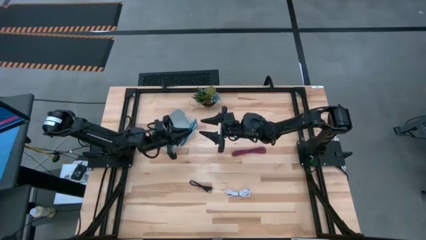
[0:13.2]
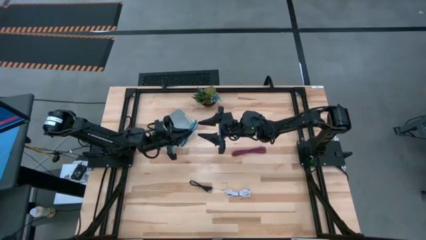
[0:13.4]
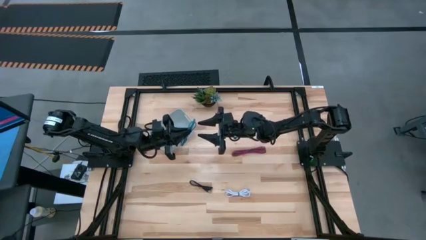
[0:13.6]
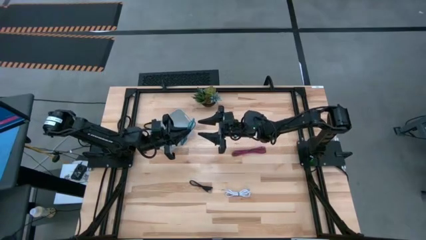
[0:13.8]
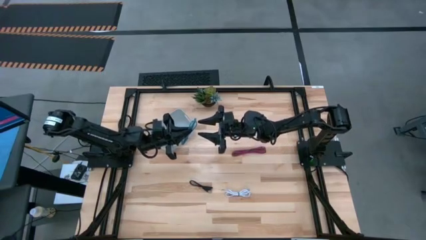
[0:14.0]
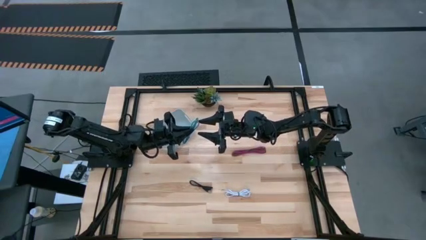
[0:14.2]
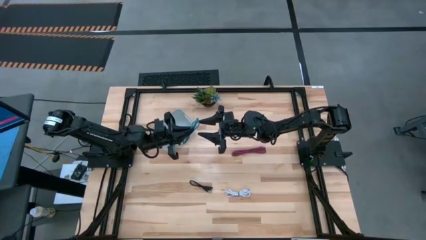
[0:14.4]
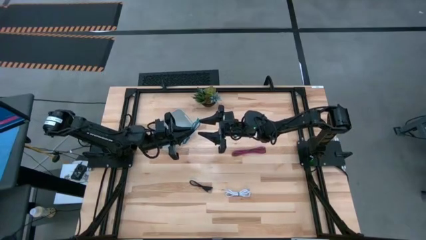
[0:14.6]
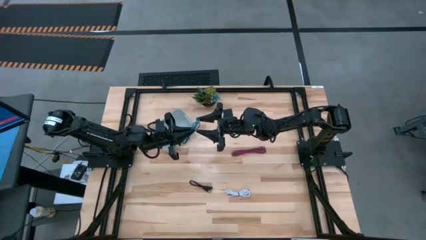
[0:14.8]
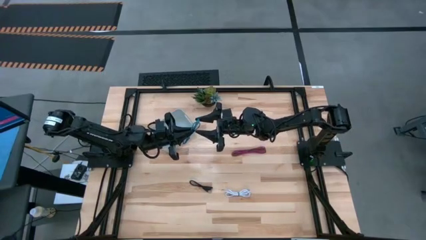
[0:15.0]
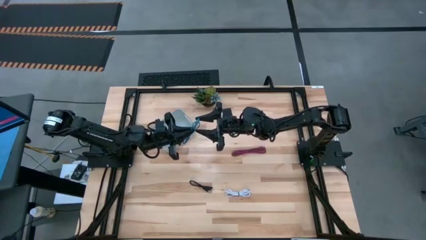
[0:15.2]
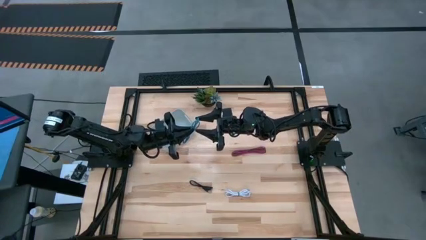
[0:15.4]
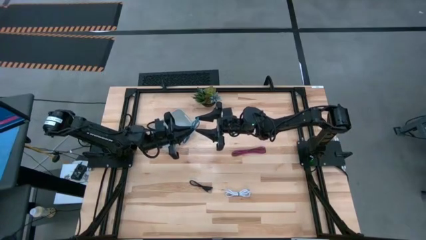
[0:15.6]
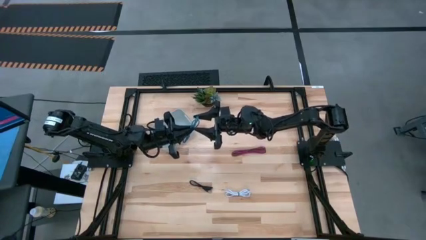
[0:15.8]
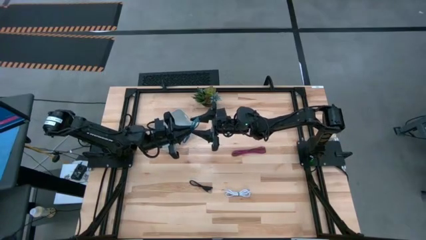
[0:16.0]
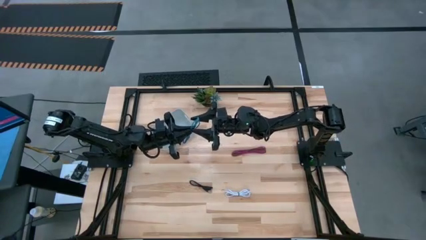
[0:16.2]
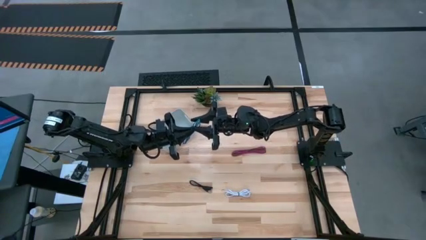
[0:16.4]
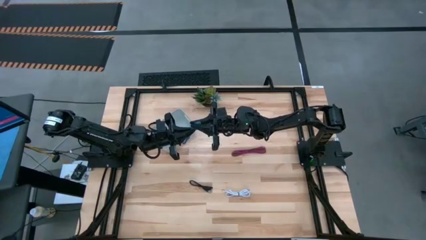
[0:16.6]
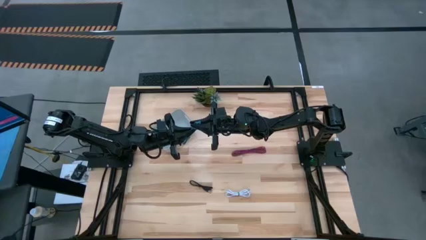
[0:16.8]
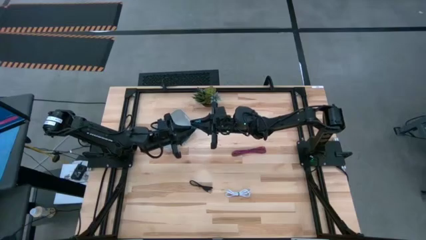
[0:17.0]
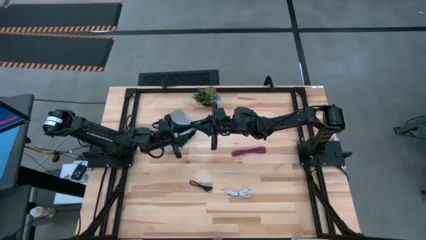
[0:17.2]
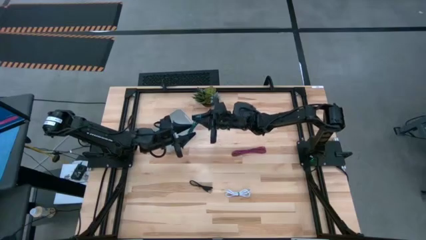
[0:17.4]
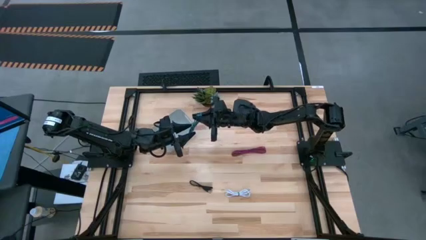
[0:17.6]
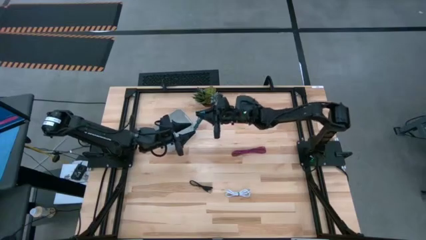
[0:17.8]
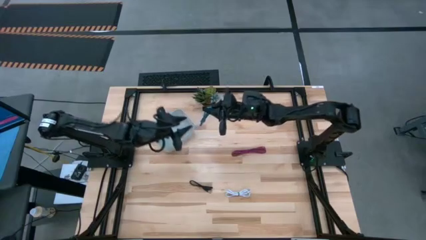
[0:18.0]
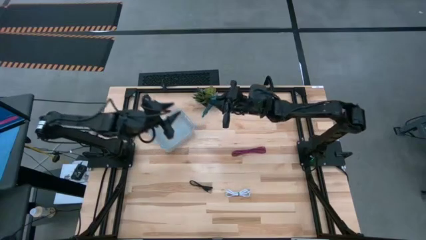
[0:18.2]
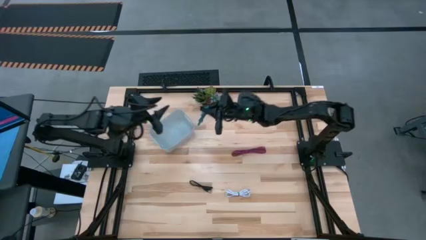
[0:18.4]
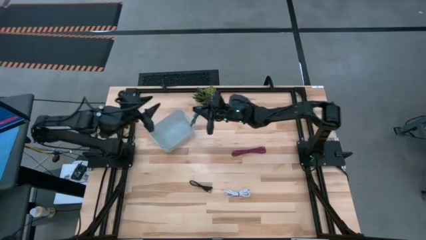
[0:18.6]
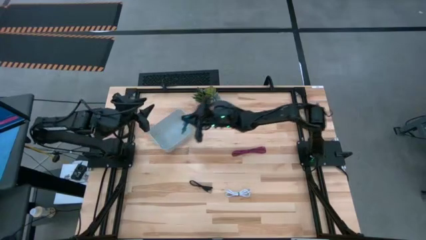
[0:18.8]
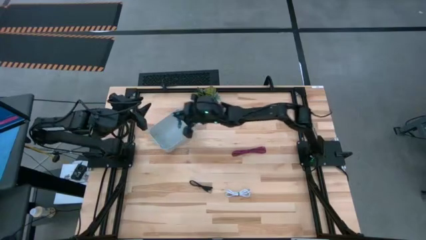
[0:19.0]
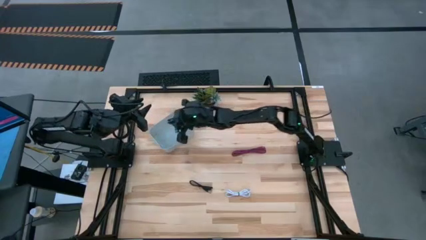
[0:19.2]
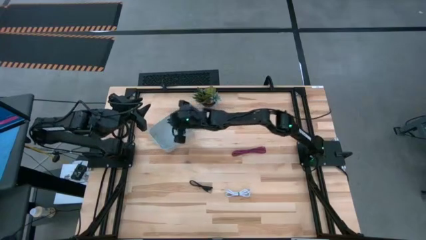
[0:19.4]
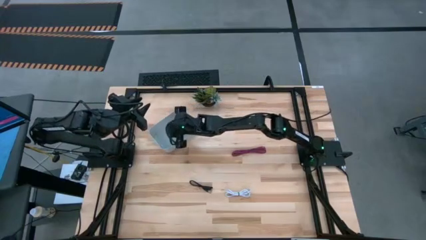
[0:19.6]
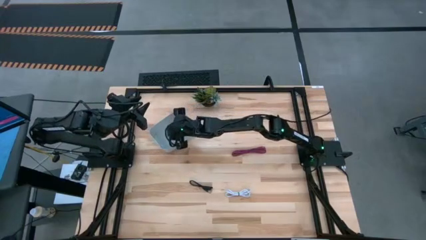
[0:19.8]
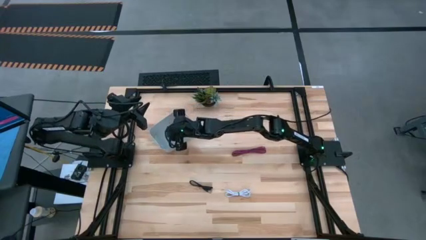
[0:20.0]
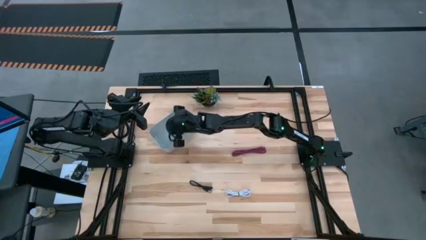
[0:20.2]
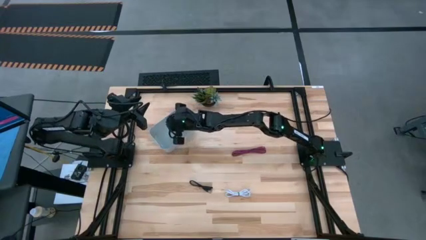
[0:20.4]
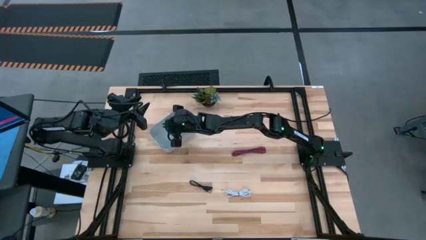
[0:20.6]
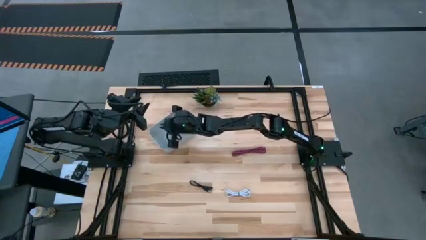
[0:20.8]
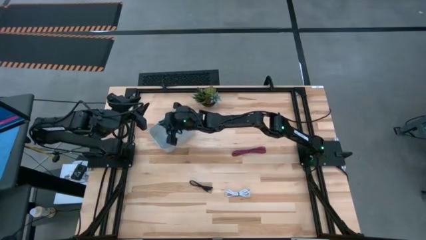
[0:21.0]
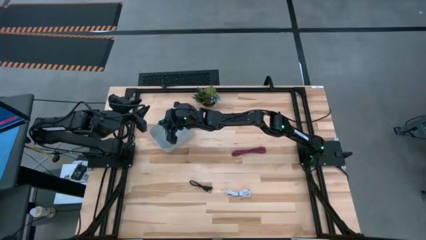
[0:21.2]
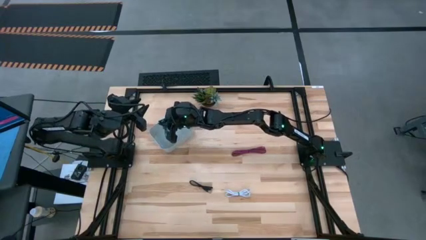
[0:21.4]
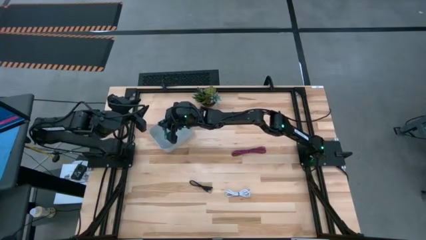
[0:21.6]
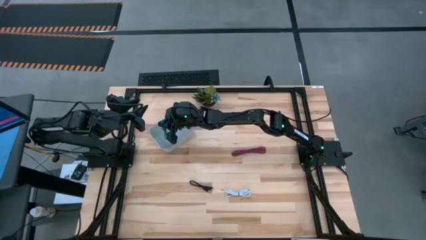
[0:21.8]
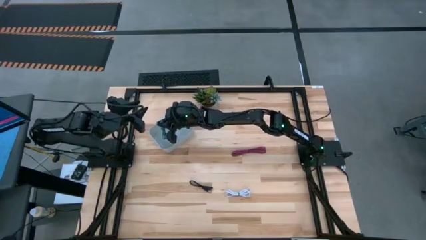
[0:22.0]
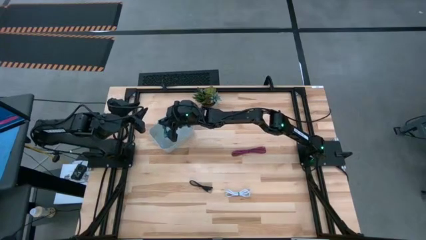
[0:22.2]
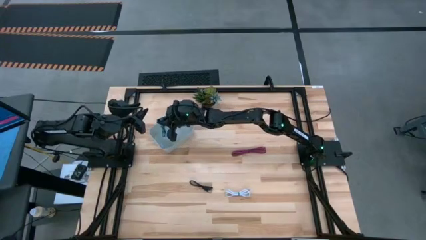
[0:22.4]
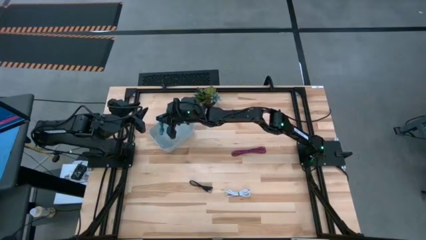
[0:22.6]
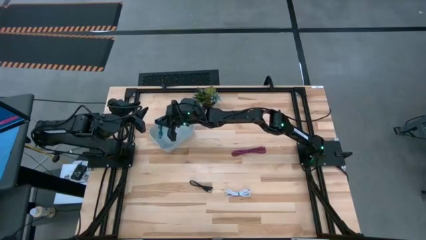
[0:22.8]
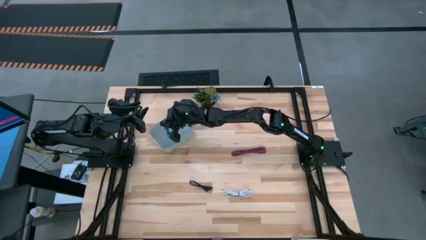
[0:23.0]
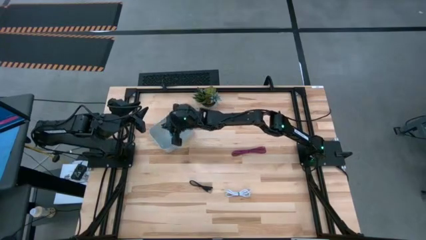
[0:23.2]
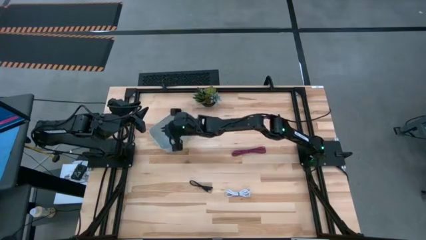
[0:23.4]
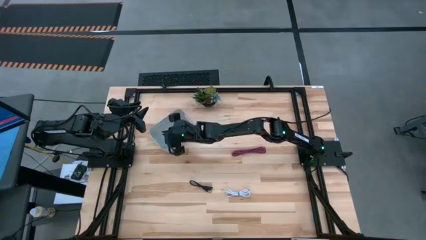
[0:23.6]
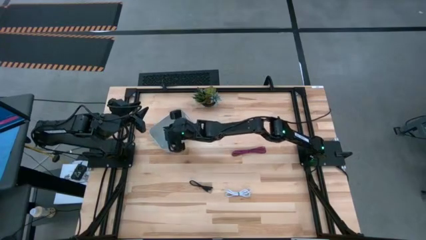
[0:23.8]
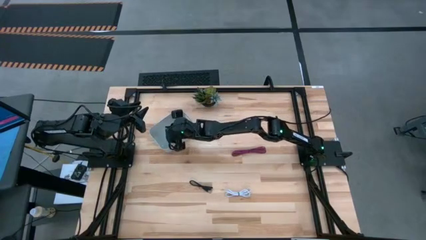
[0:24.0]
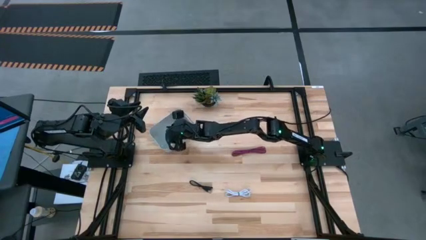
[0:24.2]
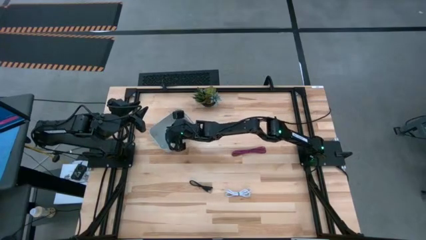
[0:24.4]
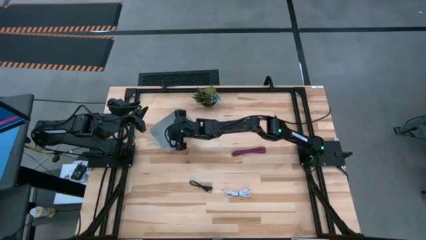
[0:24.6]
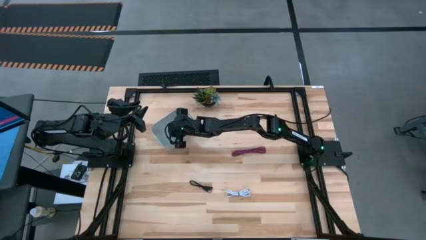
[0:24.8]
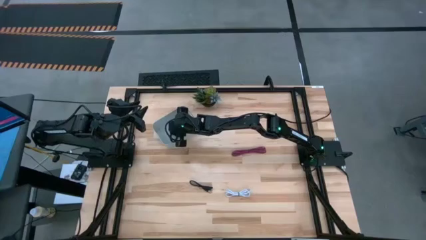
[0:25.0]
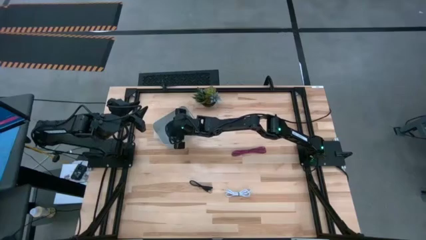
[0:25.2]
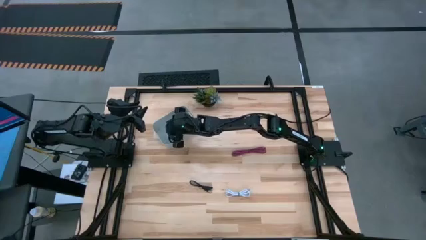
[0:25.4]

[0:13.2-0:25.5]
Task: Pick and place USB-C Cables
Put the blue charger cable into the white bin

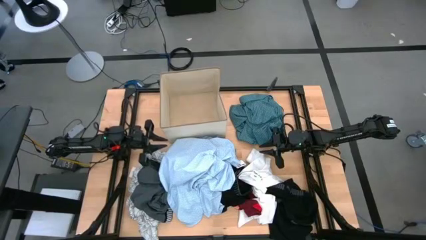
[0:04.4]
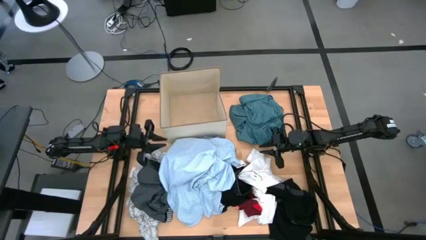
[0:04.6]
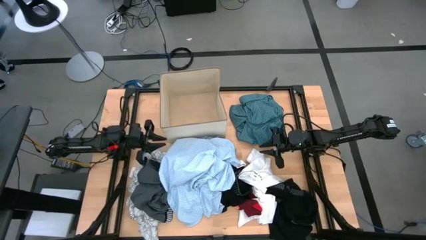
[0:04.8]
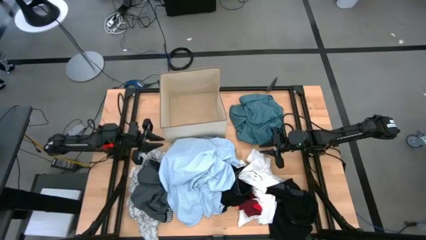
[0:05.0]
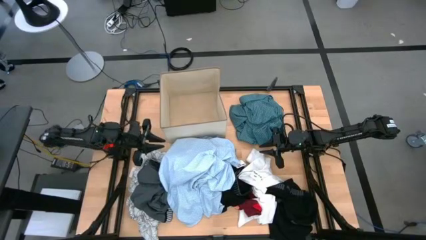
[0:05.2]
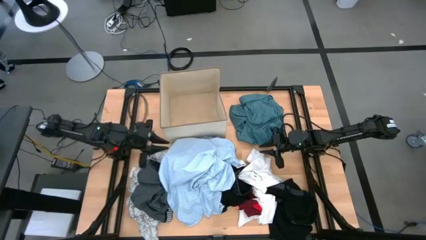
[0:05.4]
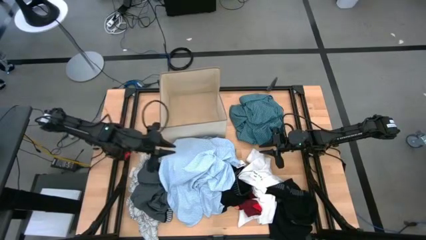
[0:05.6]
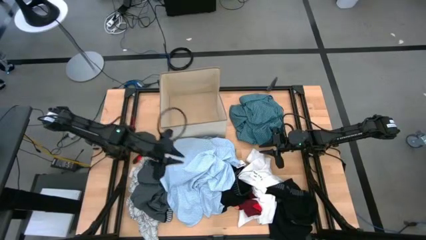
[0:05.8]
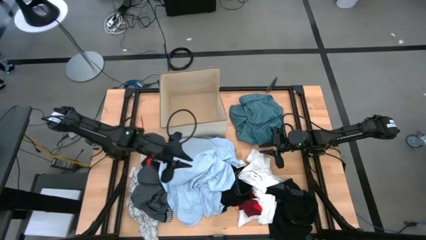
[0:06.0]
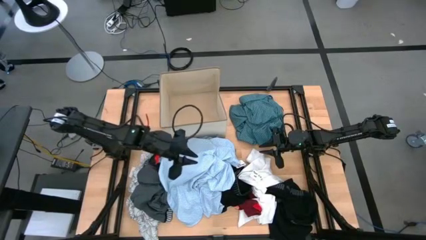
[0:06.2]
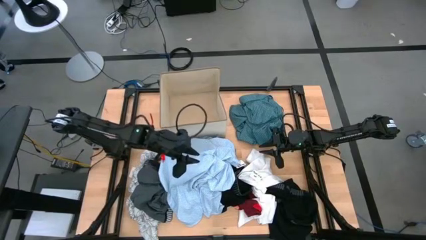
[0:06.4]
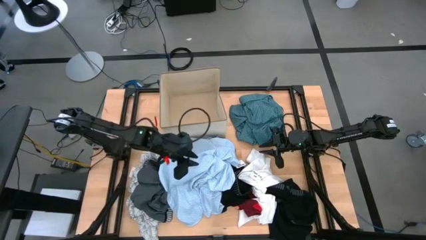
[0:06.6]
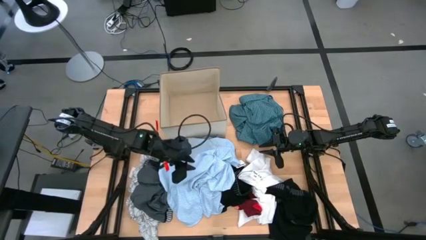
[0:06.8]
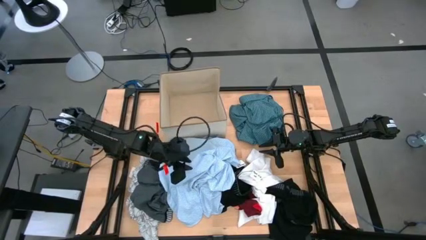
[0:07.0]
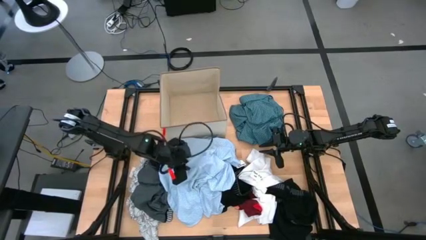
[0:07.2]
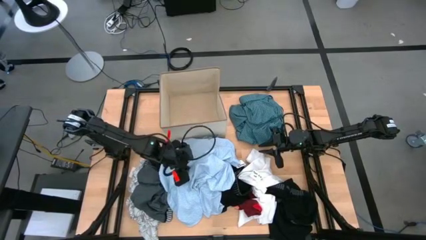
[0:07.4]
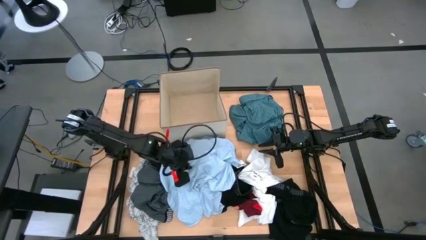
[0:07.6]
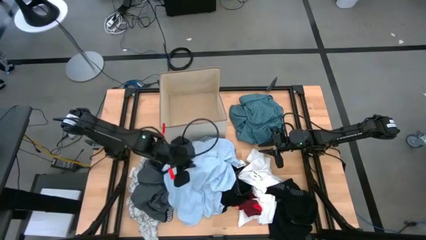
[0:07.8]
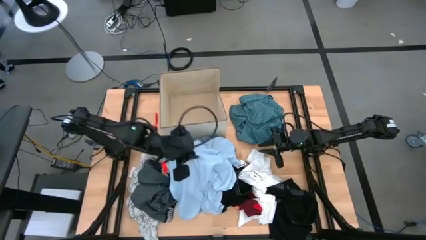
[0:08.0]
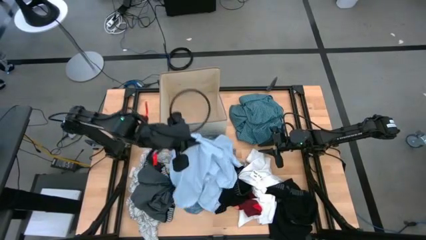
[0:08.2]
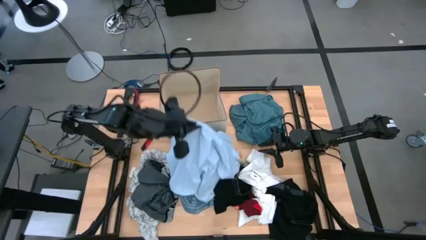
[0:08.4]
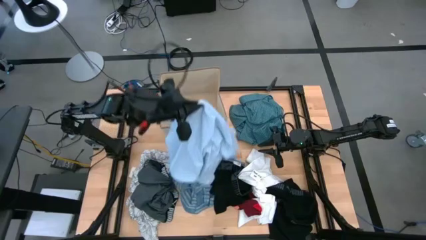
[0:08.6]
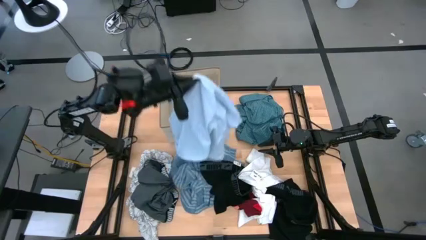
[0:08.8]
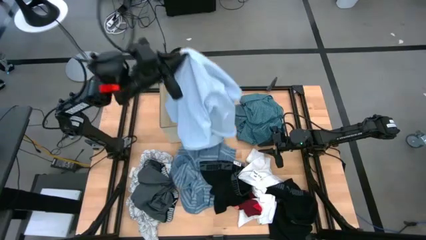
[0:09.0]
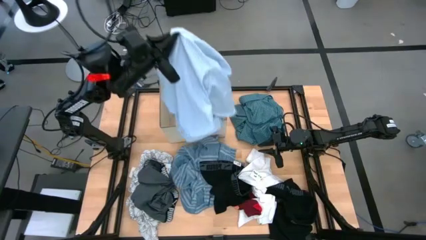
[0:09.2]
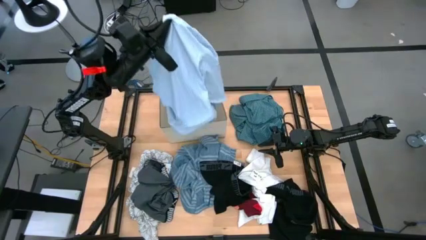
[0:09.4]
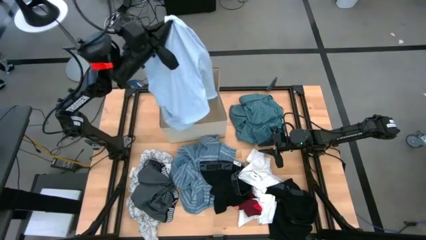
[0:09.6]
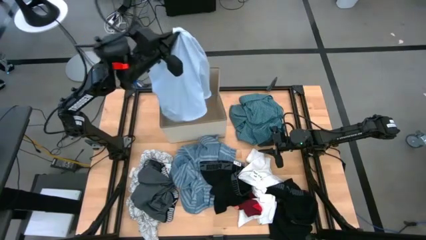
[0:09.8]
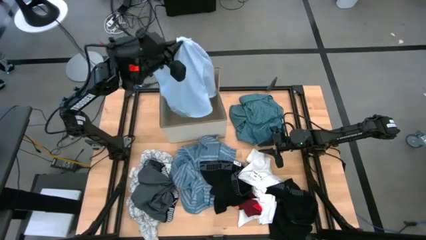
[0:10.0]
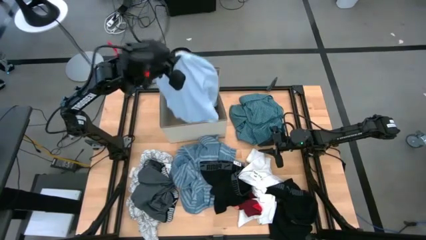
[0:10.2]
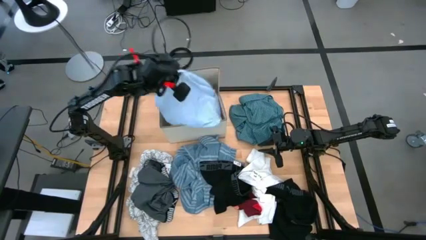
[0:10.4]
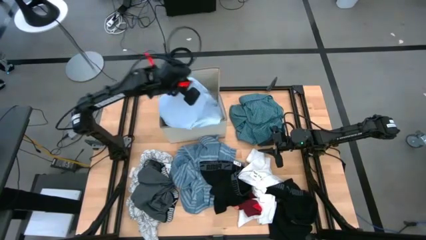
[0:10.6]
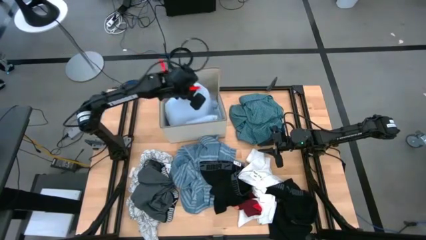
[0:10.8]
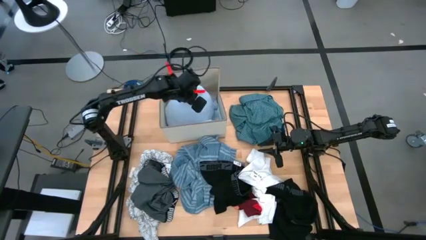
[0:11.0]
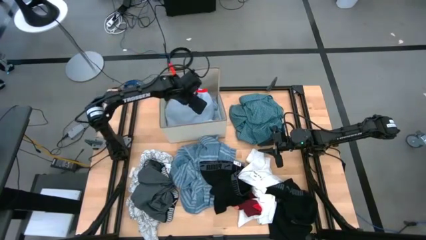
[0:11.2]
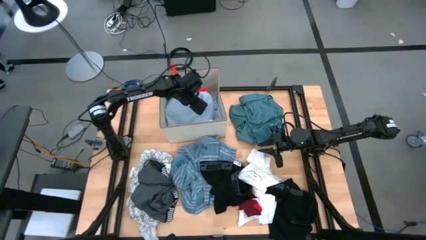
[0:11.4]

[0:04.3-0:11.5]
Task: Sort clothes
Put the blue polo shirt into the white laundry organizer
